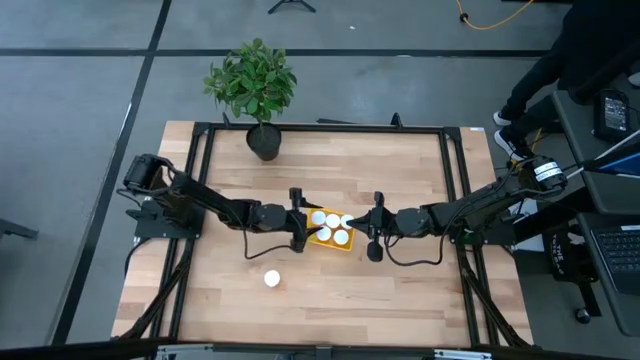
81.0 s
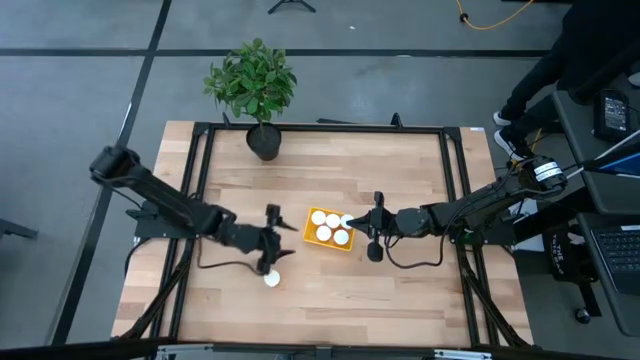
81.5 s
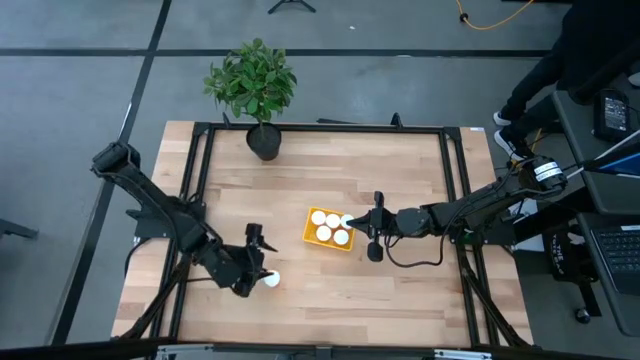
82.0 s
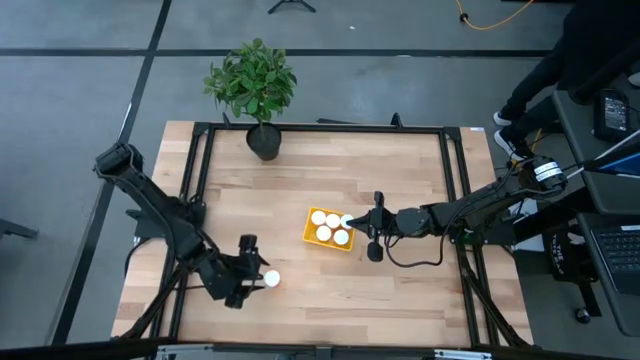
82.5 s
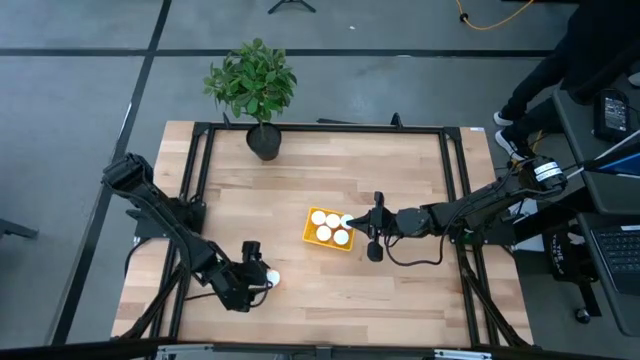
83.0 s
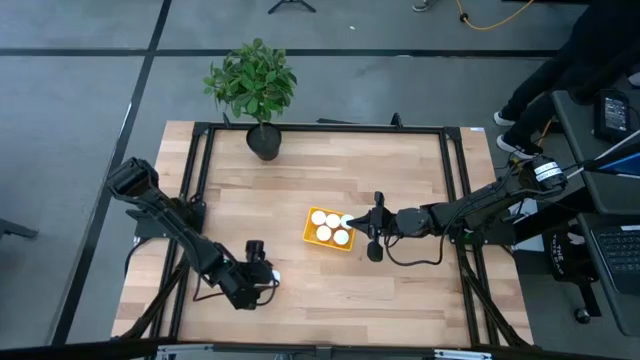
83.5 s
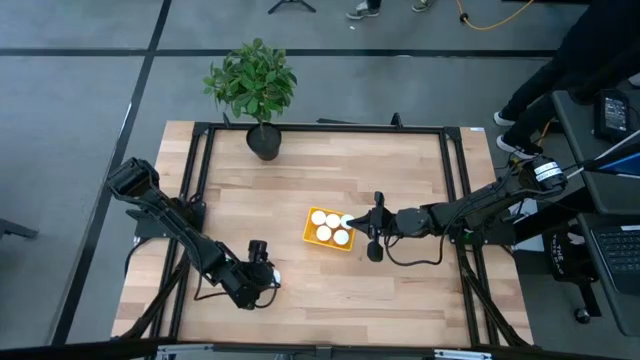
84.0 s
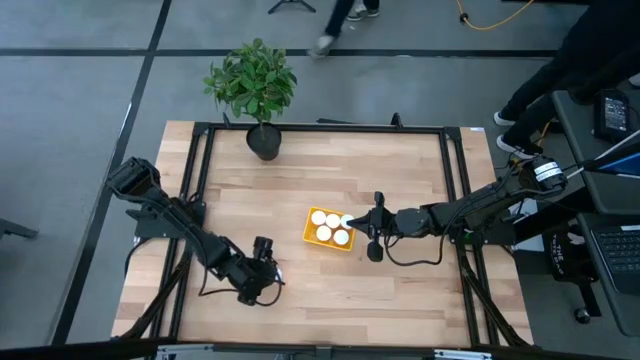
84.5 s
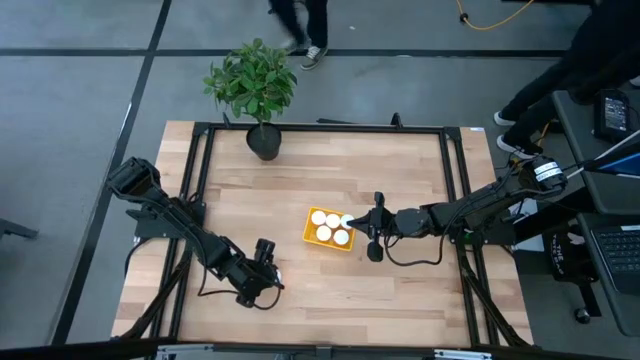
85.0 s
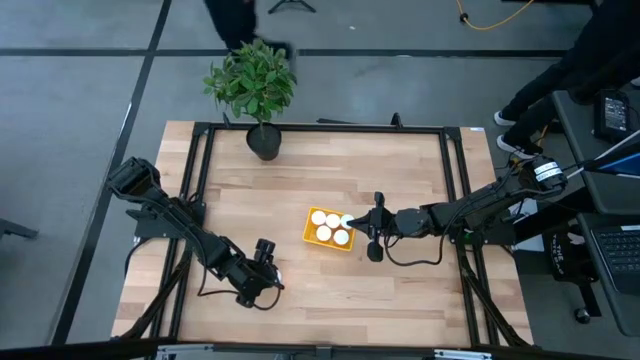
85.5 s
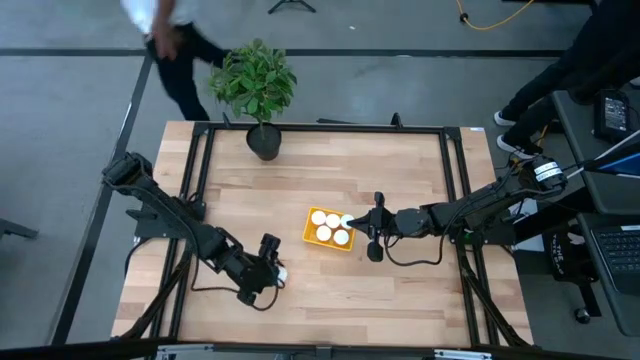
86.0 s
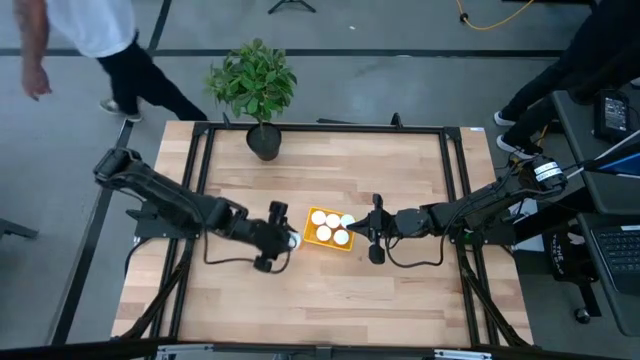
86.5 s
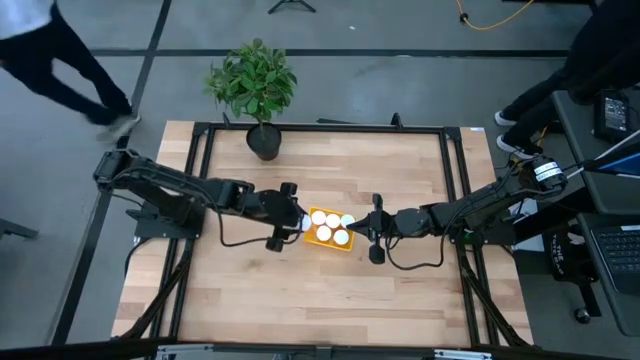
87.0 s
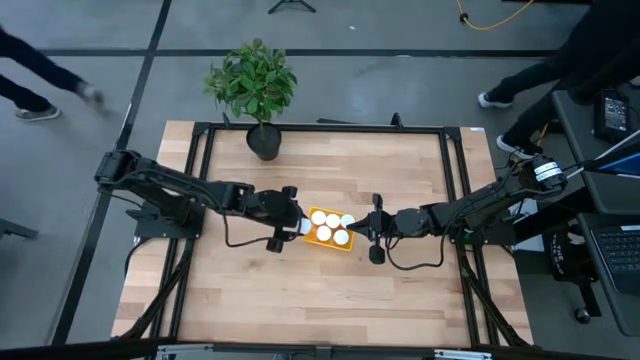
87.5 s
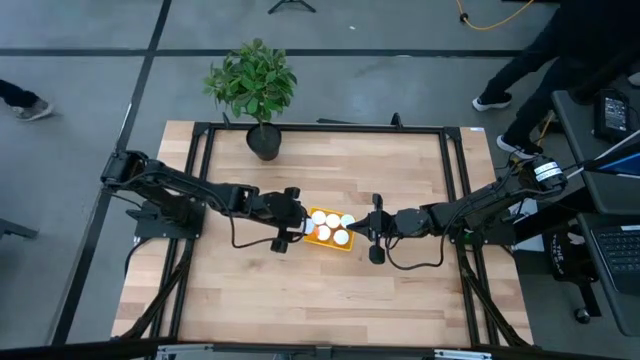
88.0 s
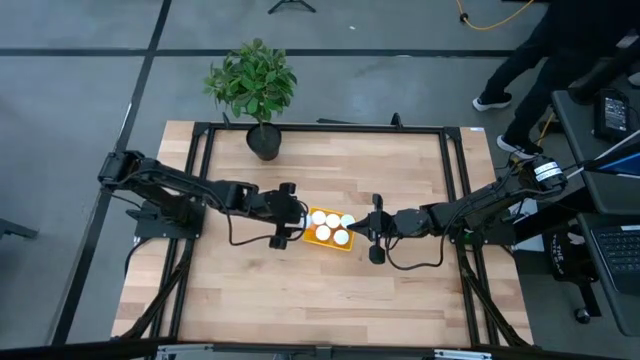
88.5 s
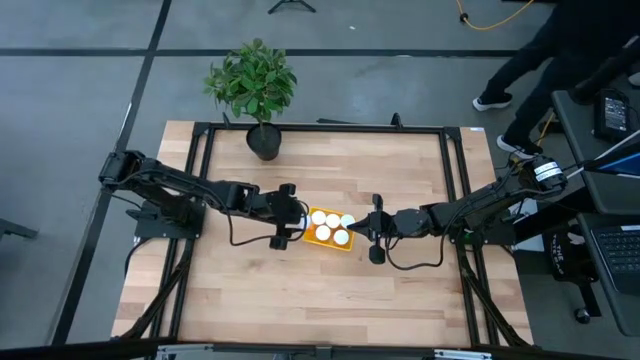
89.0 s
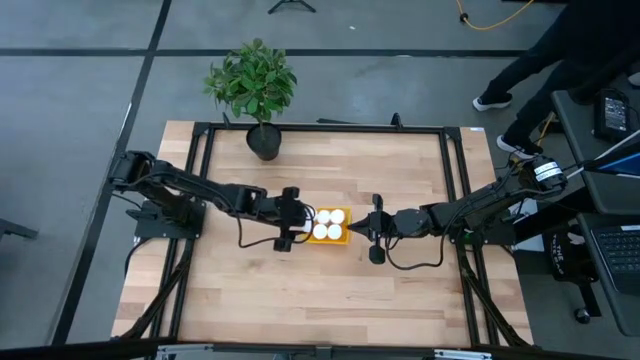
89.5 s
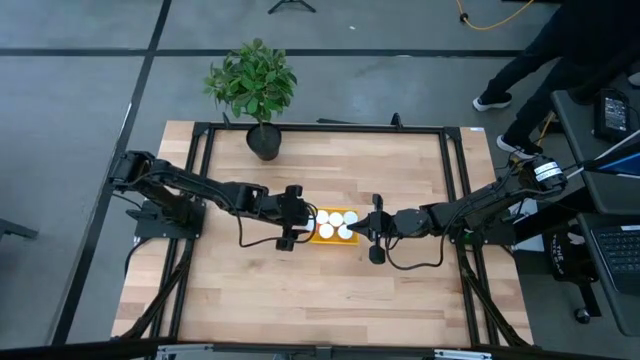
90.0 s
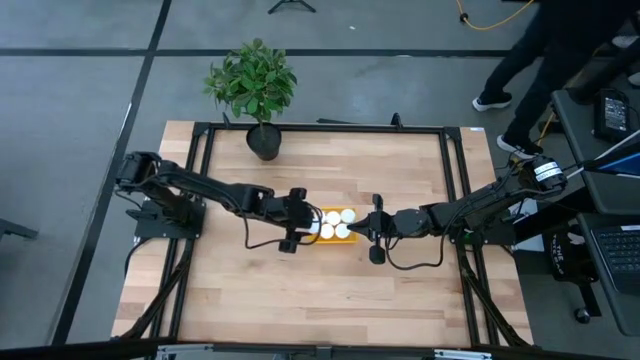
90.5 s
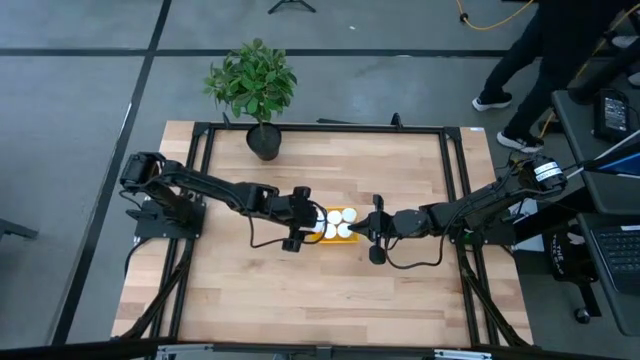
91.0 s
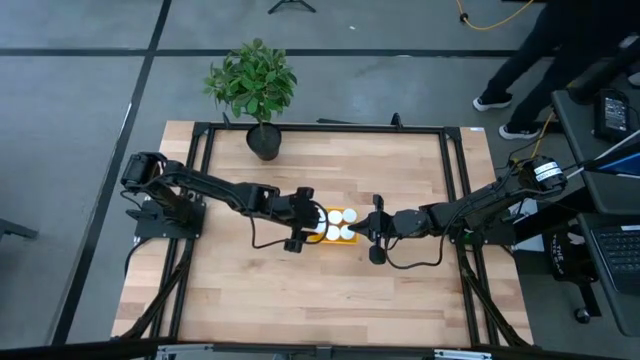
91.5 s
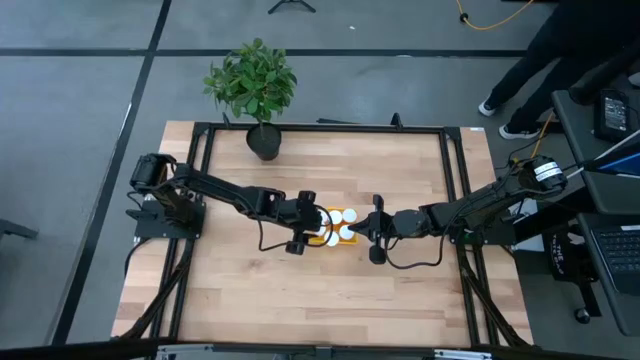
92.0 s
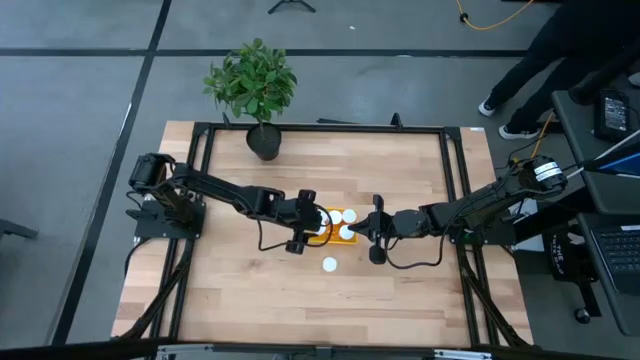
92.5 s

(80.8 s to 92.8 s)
Task: Pick and place pill bottles into a basket
Put the orange pill bottle into the yellow bin

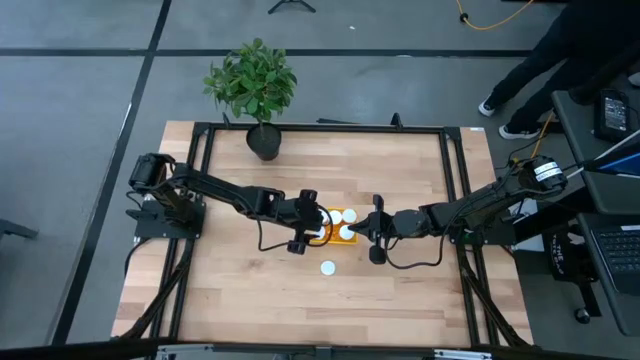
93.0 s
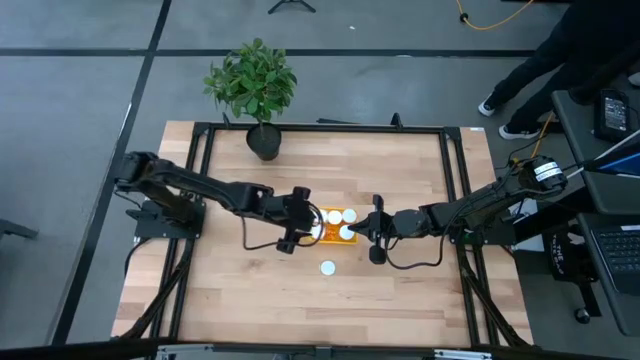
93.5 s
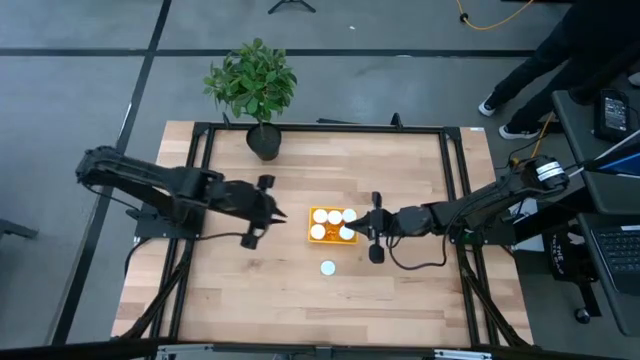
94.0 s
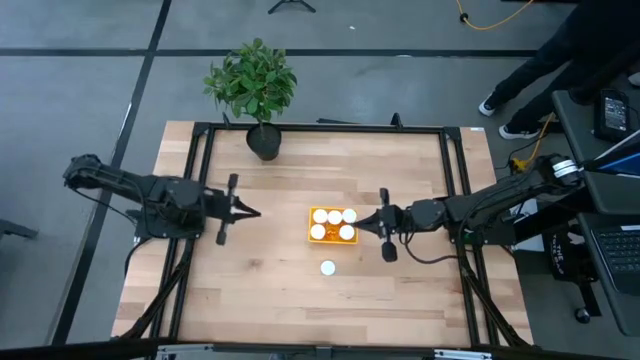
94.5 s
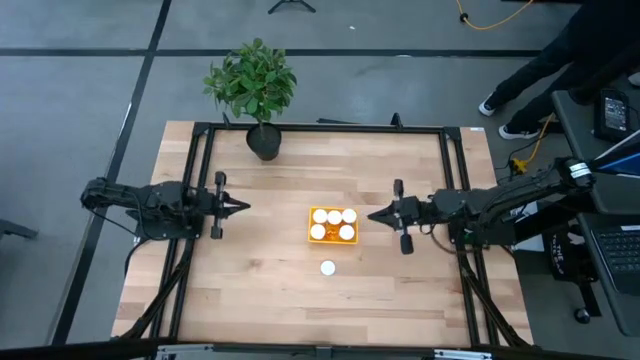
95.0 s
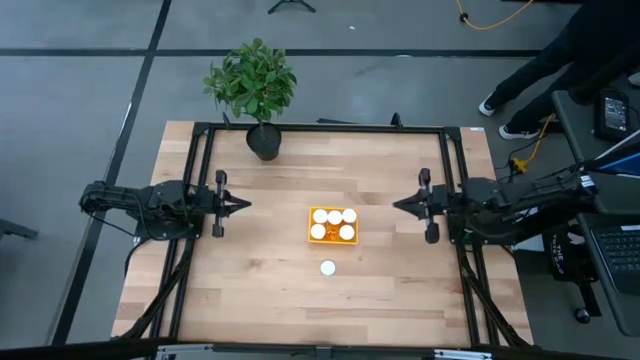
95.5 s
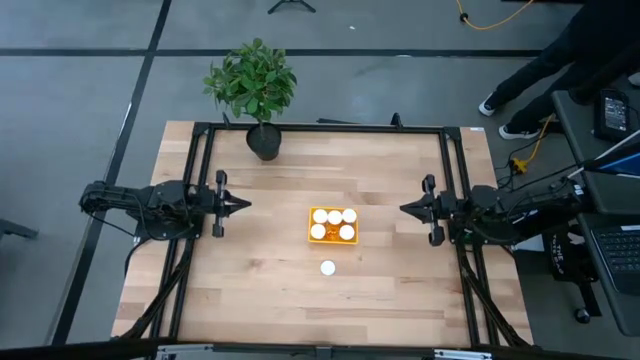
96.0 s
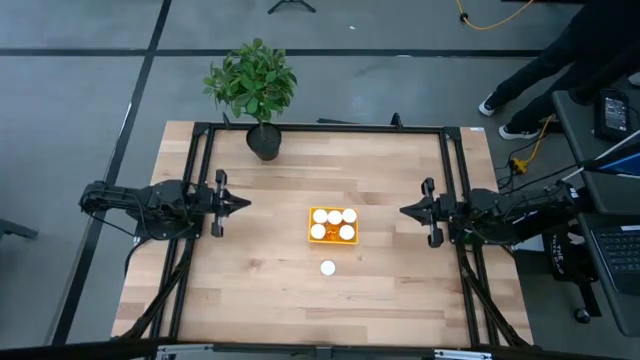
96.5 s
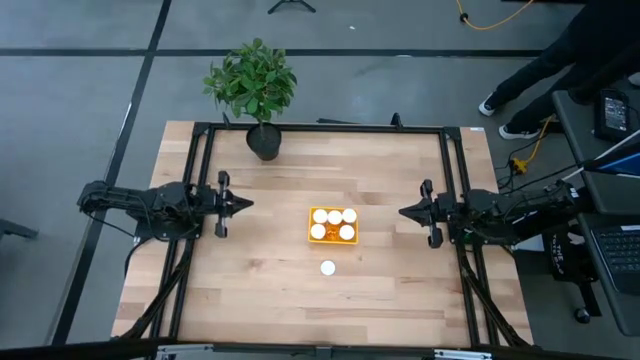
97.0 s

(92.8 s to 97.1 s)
Return to Home Position

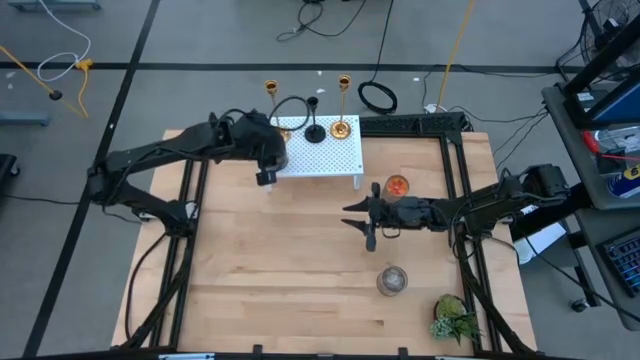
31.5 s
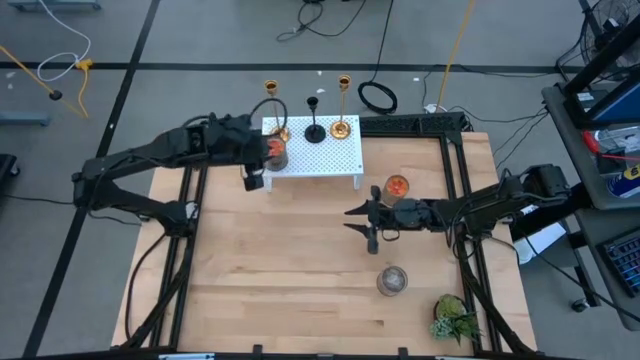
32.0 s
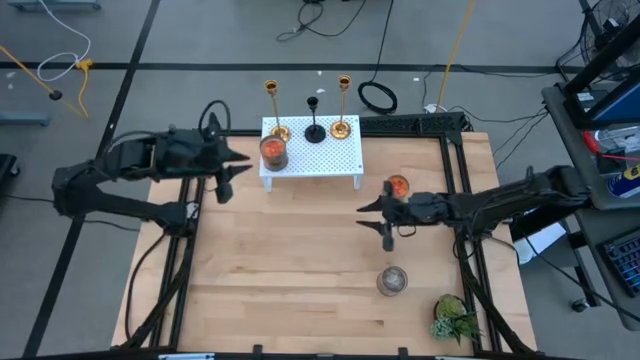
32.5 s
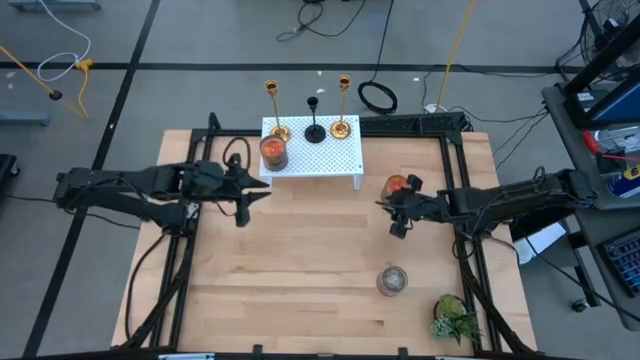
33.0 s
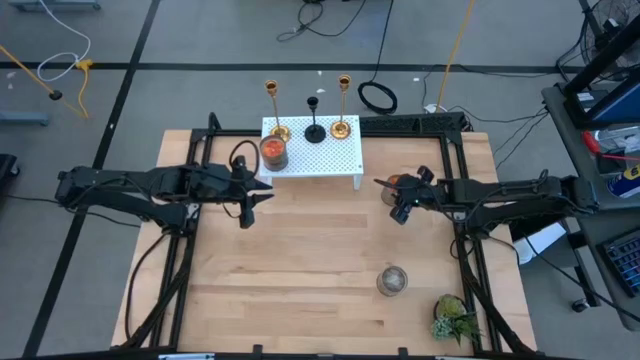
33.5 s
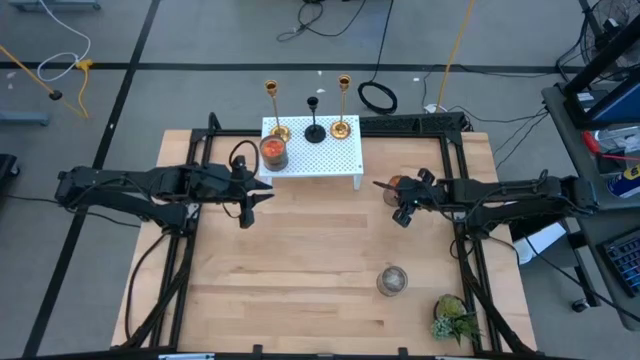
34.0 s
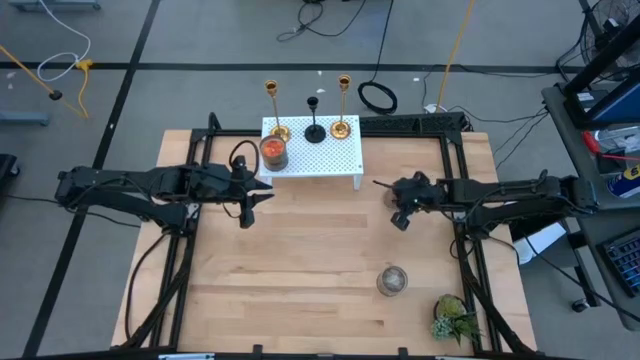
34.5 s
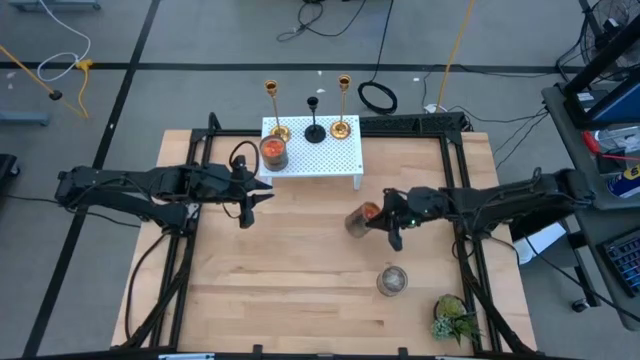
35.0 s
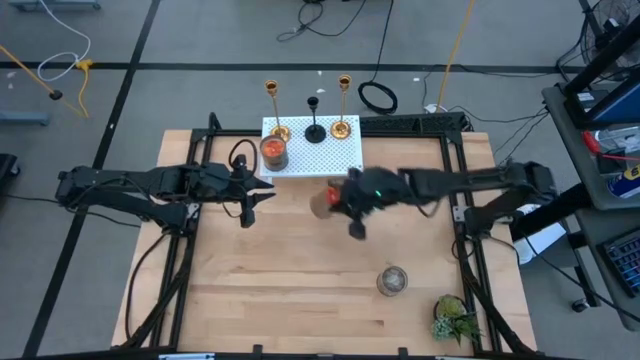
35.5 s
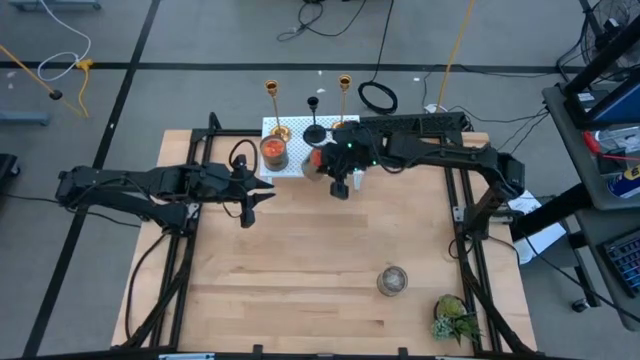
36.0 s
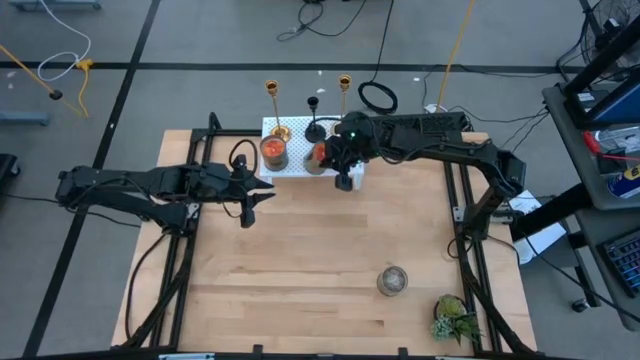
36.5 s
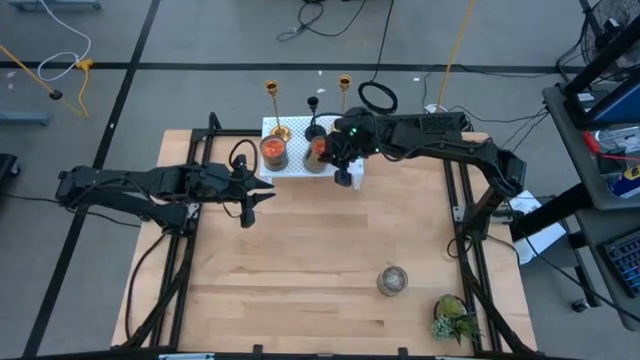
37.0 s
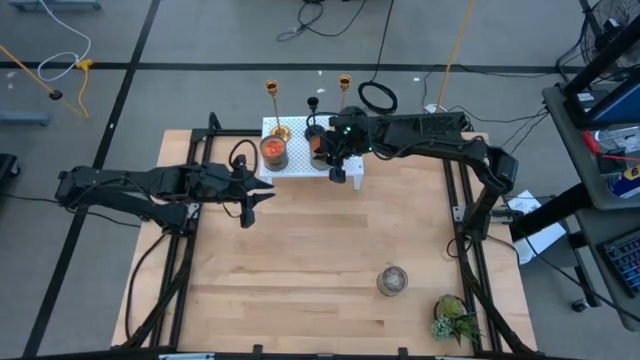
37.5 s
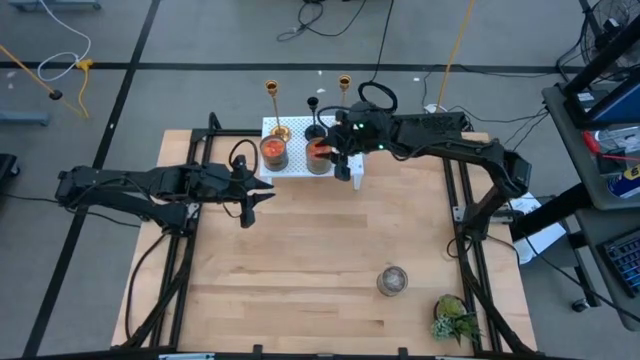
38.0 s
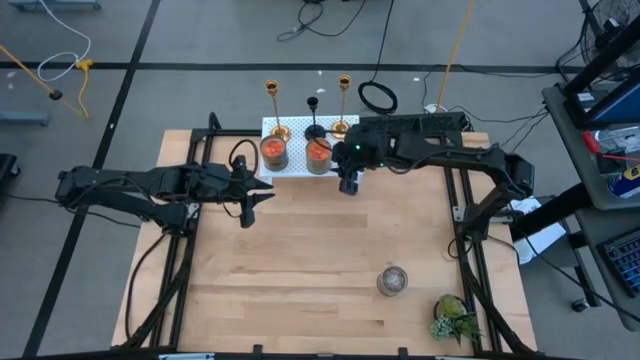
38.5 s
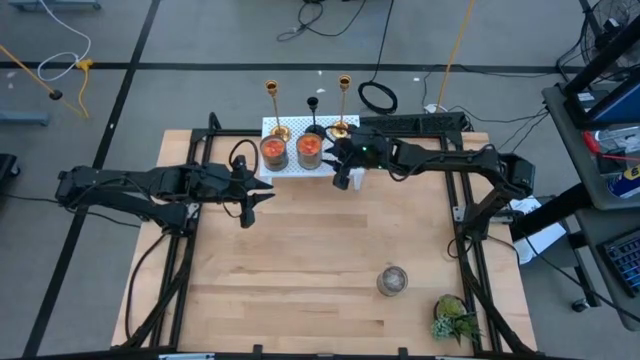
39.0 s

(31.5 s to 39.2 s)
Task: Pick & Place candle stick holders
Put the orange candle on the shelf
